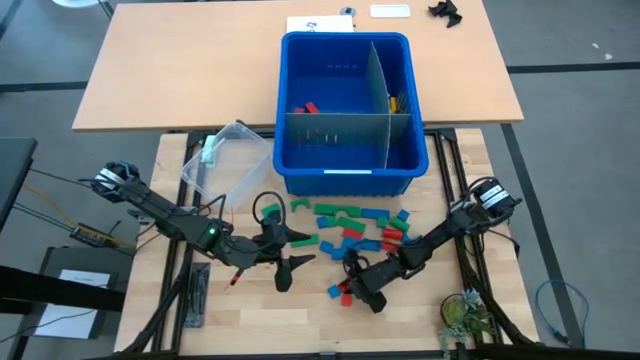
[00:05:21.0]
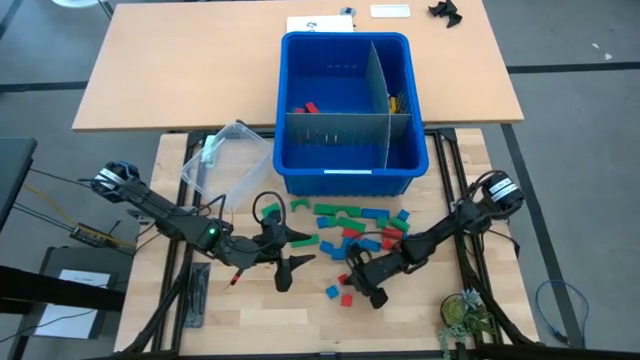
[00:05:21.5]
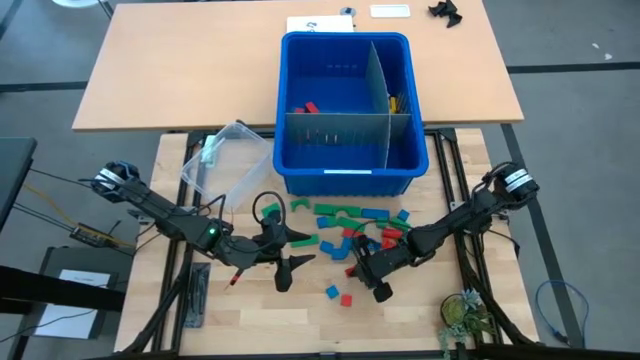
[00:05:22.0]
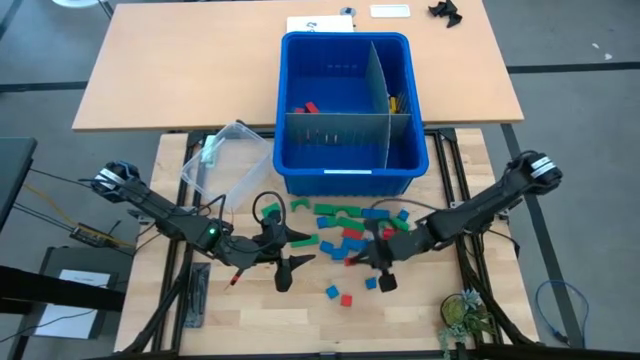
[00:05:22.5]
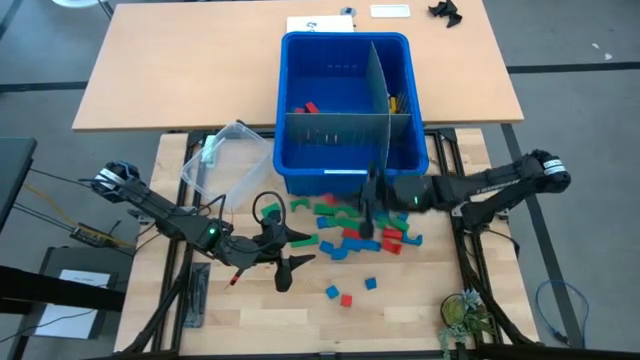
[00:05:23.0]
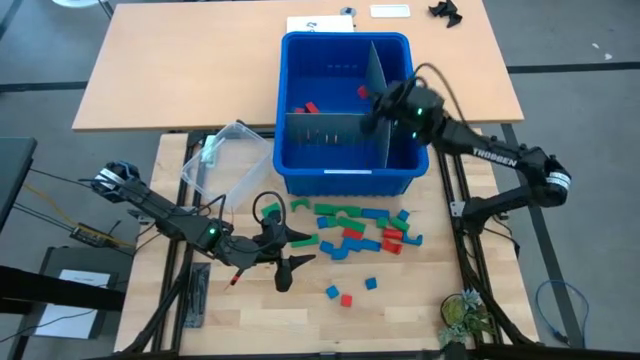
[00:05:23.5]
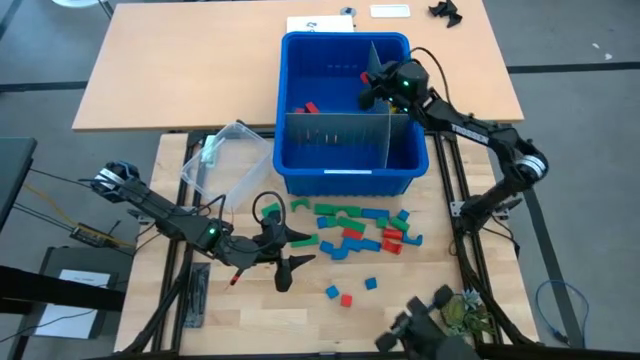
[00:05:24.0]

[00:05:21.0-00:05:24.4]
Task: Sort blocks
Put the red block into the blue bin

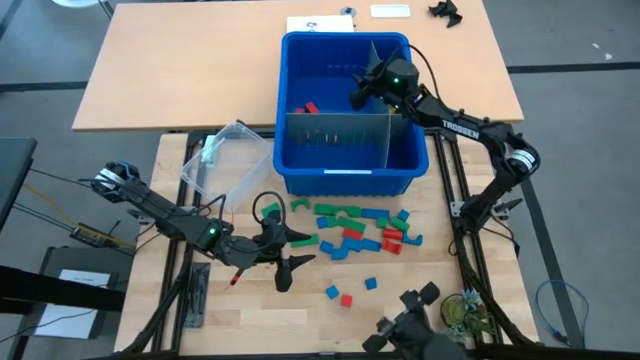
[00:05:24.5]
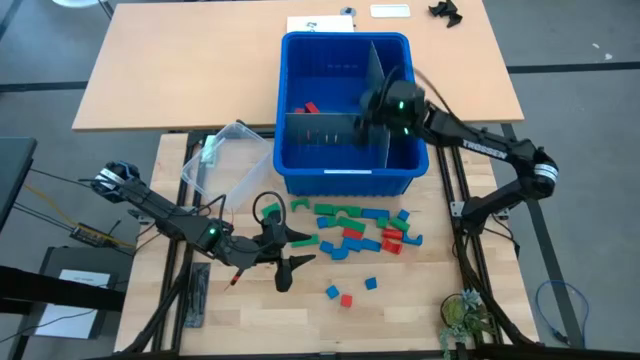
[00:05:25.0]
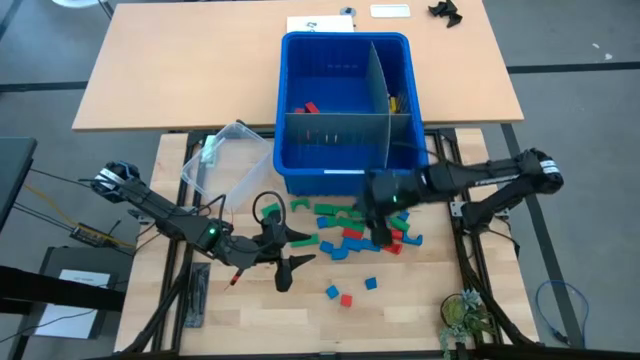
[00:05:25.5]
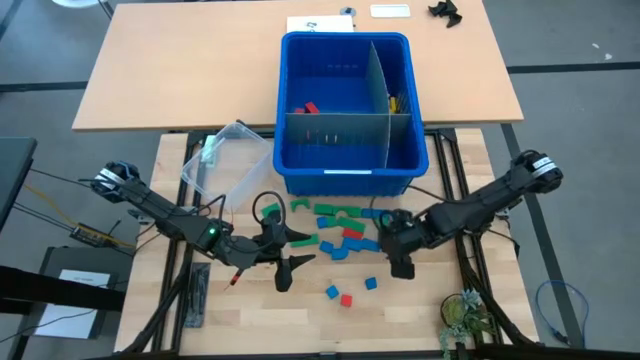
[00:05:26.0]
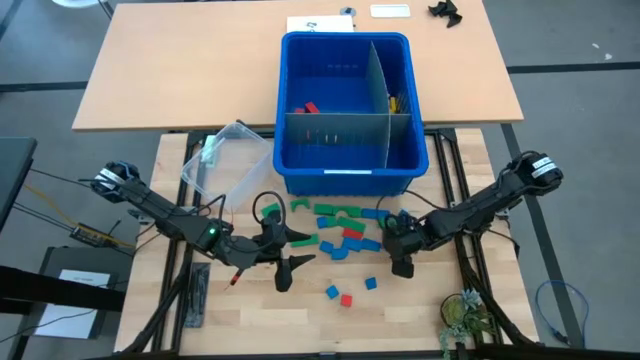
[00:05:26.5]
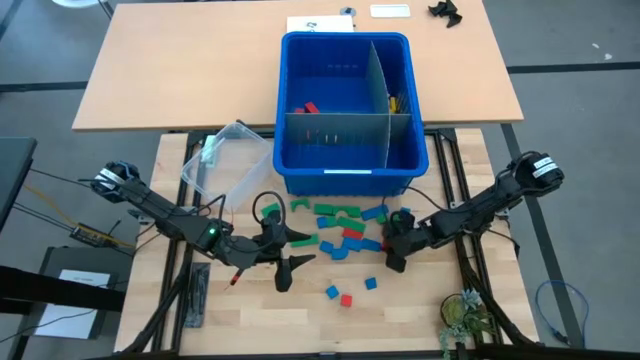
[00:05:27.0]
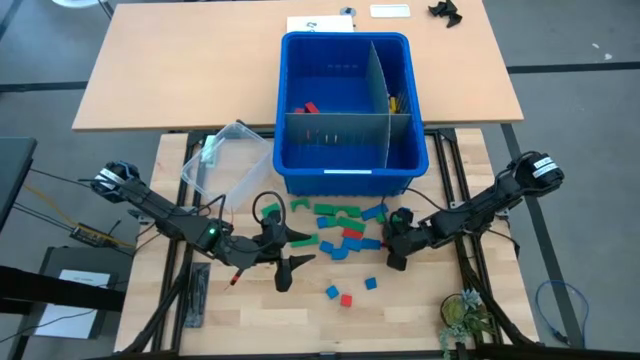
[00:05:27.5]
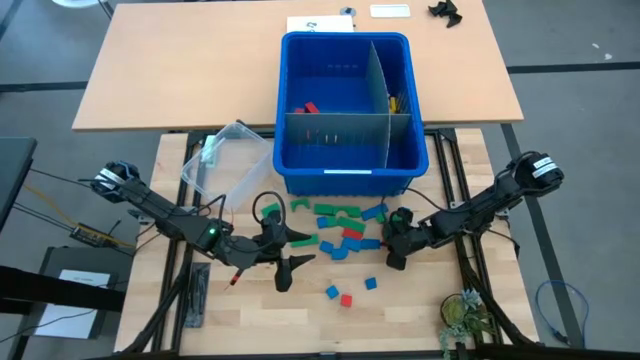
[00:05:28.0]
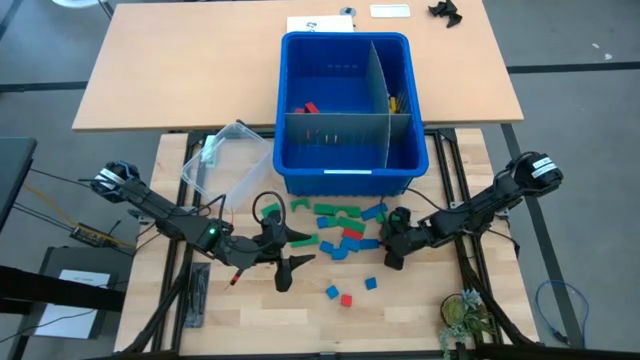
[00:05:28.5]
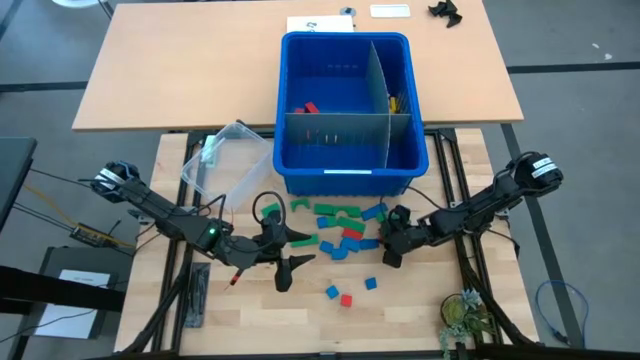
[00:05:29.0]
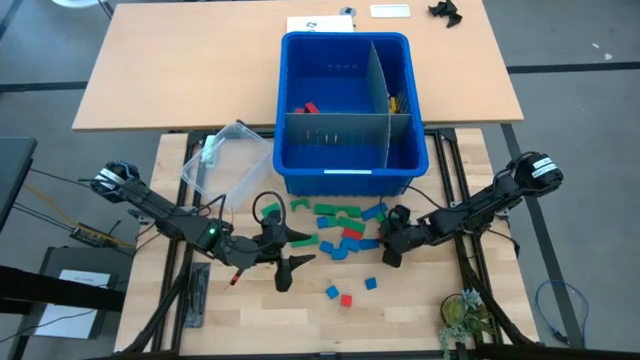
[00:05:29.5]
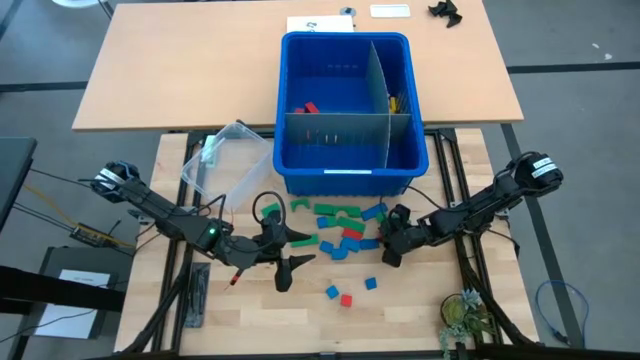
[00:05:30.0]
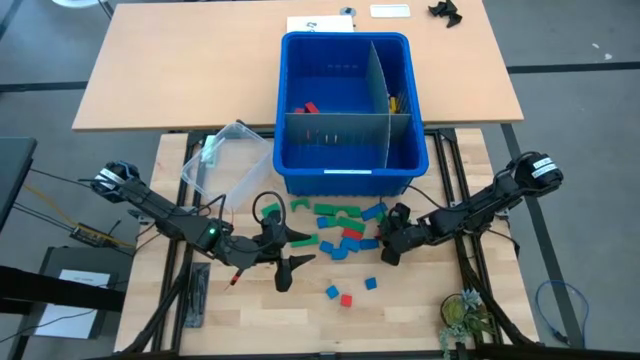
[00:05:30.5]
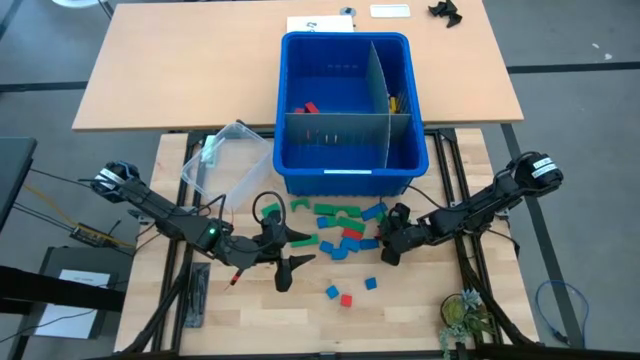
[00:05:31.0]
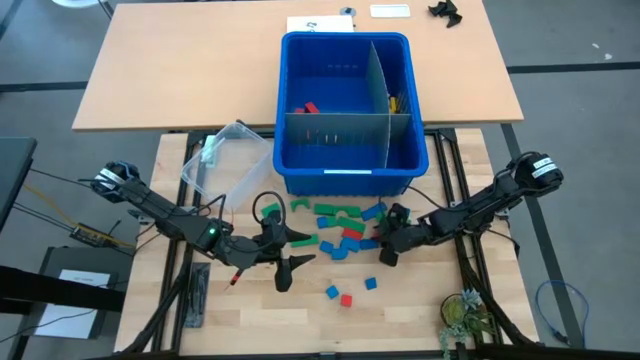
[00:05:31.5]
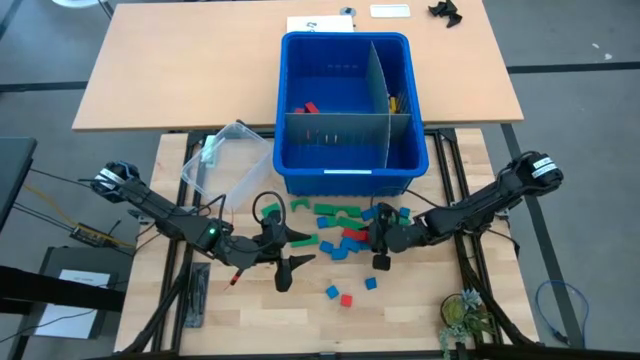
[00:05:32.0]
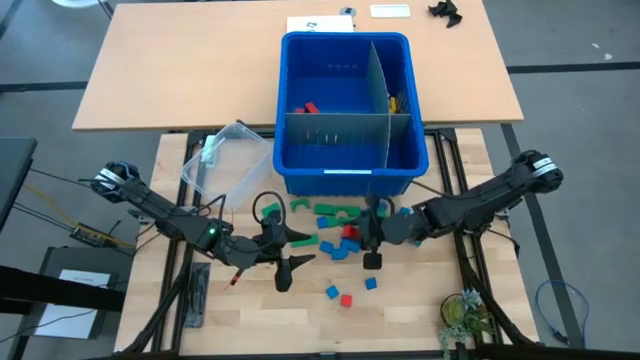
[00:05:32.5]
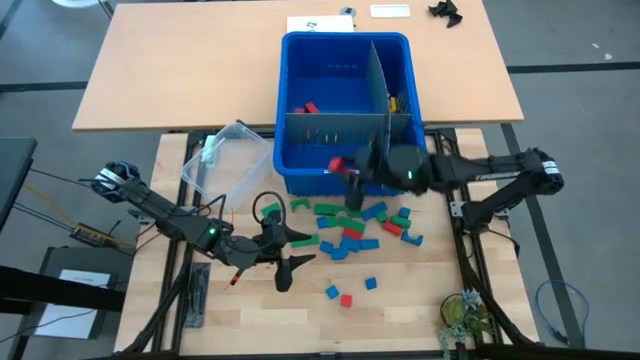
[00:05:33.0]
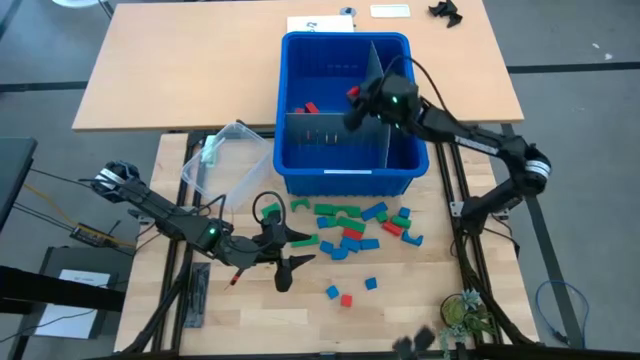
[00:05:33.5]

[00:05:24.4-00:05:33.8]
Put the red block into the blue bin

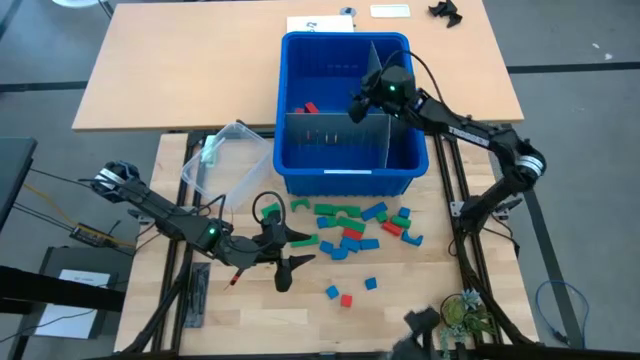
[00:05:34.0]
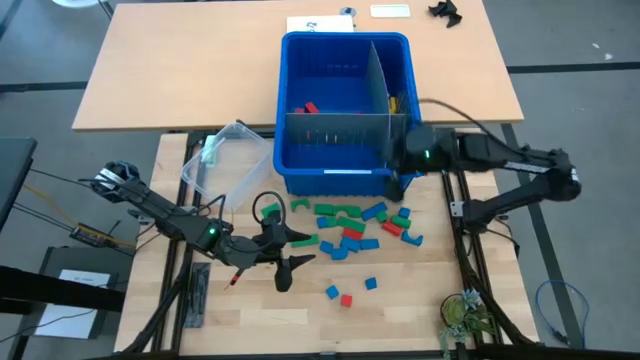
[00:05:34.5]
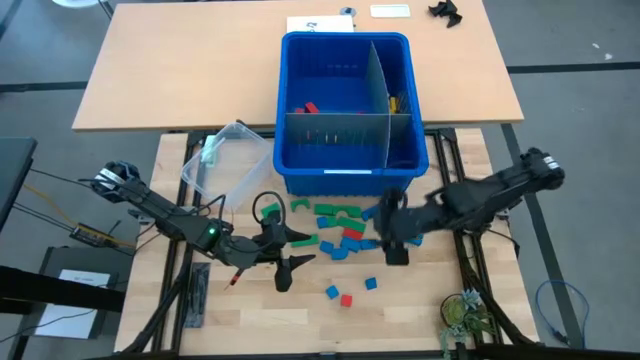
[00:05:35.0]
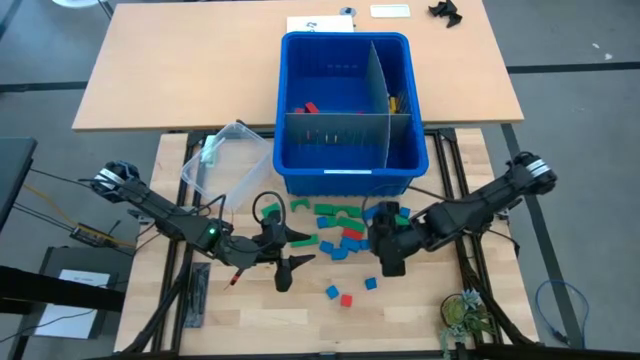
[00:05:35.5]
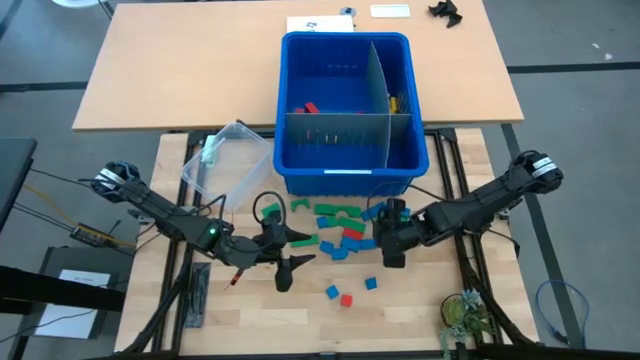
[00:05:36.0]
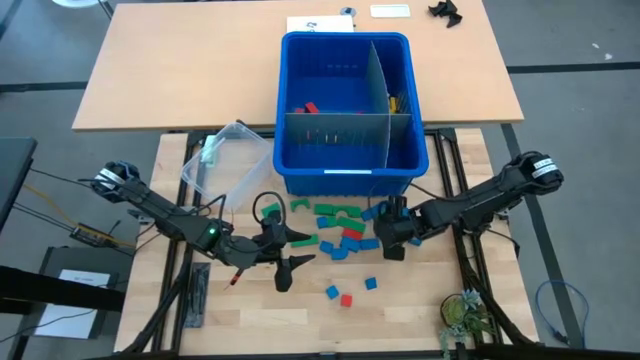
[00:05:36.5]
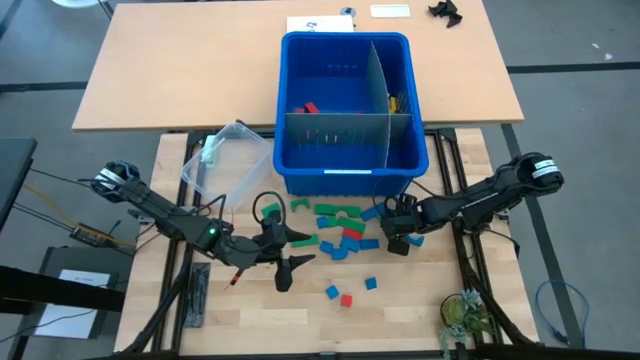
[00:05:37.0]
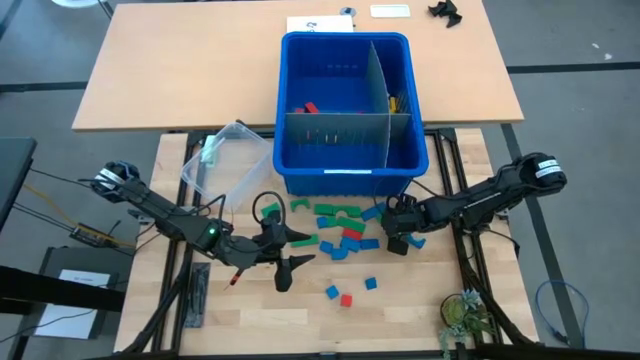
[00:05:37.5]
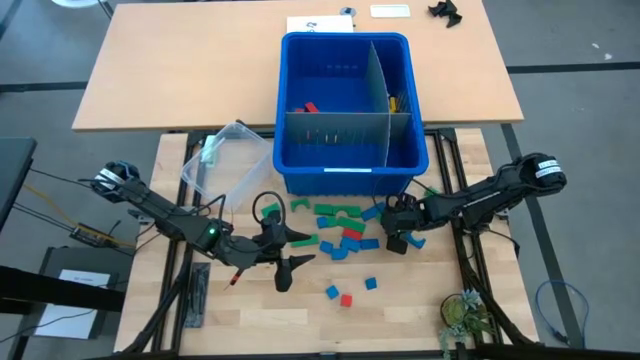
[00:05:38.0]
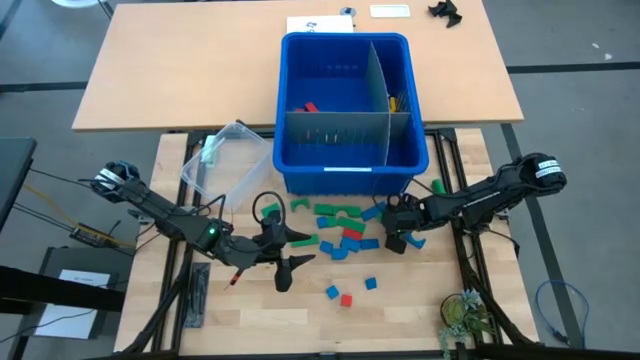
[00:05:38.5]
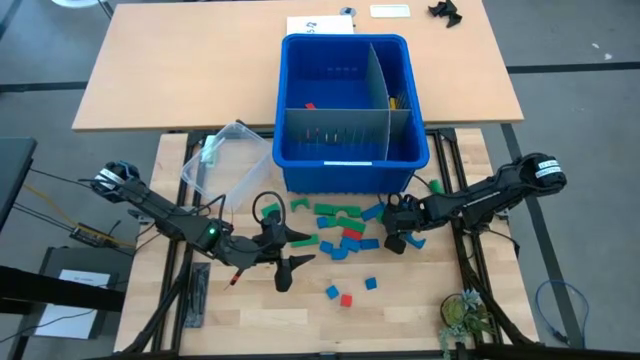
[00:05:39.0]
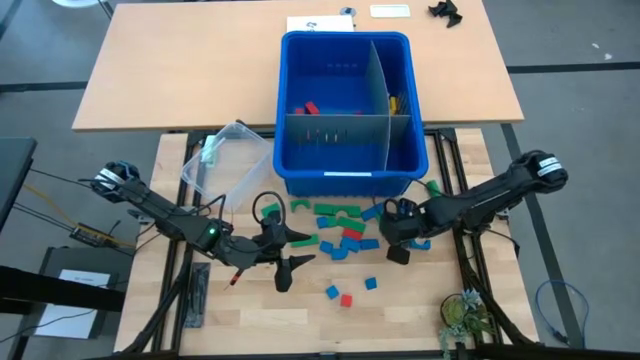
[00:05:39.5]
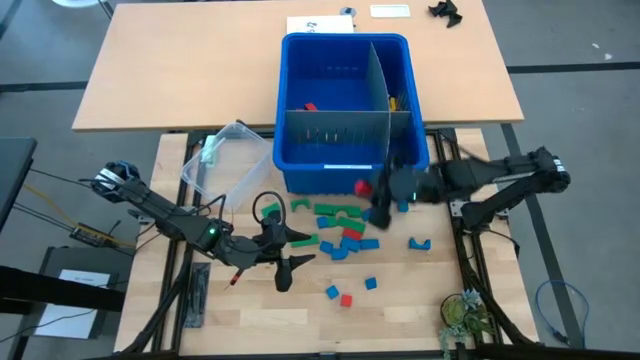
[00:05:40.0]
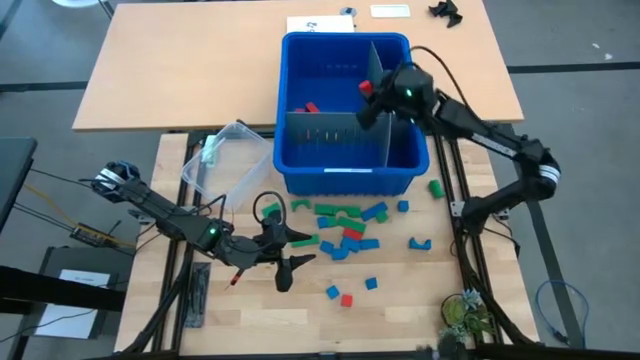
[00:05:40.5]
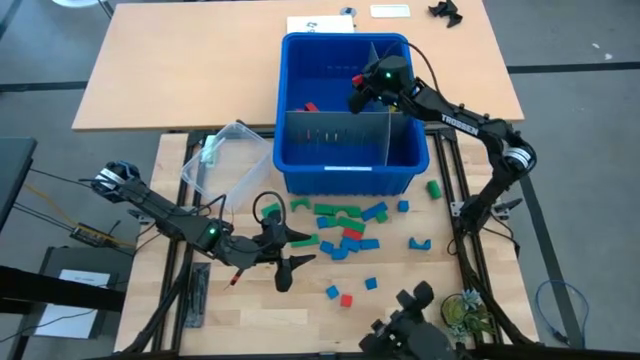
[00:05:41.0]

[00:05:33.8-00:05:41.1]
Put the red block into the blue bin
